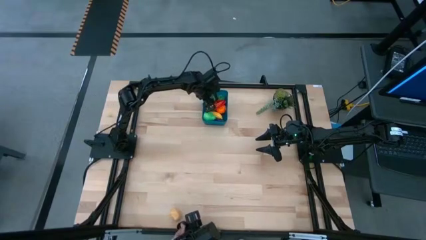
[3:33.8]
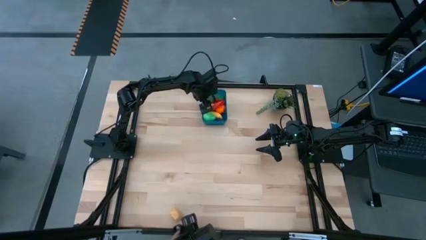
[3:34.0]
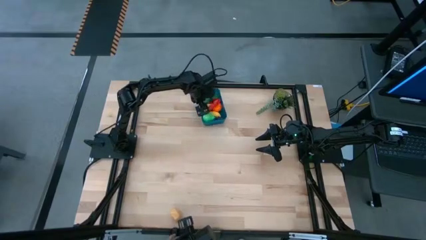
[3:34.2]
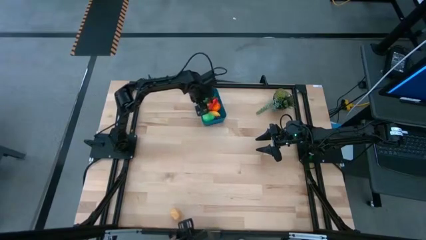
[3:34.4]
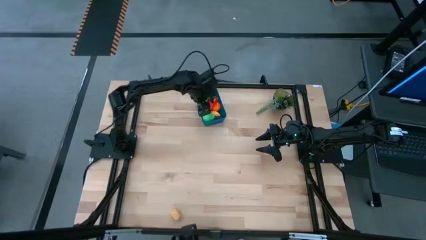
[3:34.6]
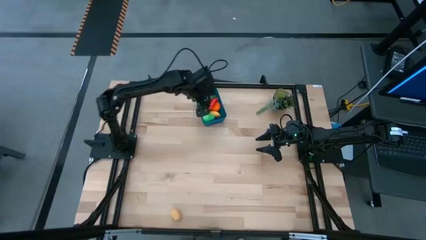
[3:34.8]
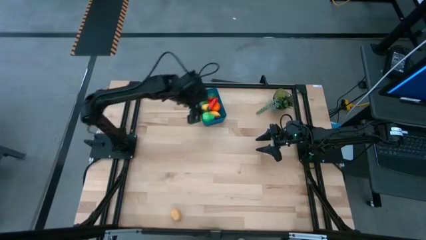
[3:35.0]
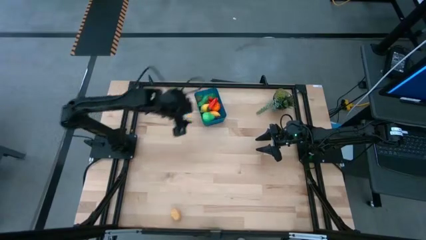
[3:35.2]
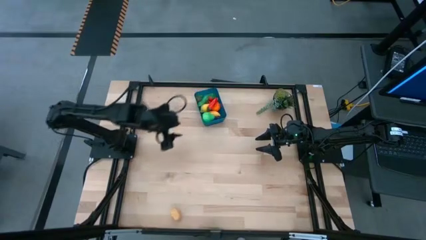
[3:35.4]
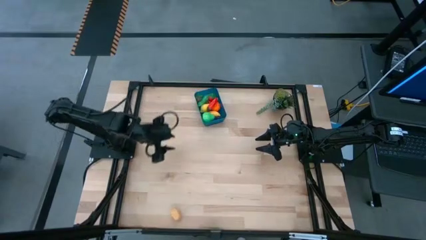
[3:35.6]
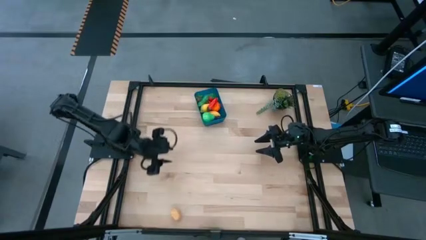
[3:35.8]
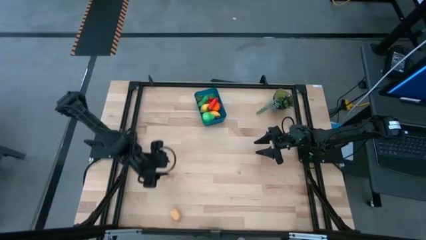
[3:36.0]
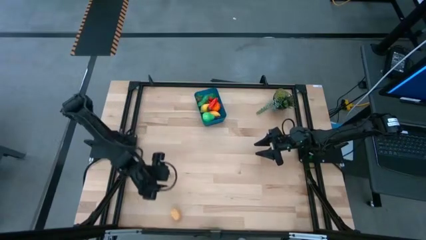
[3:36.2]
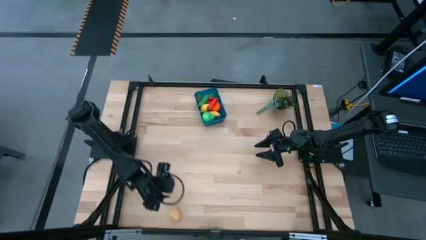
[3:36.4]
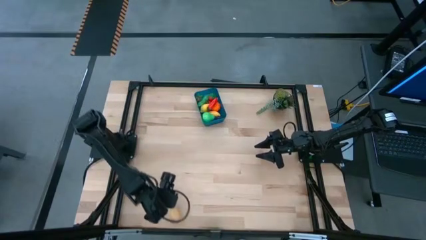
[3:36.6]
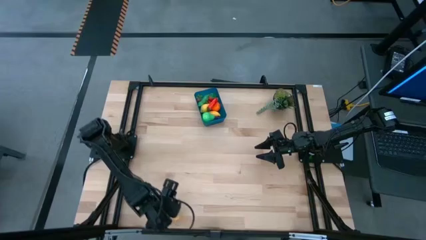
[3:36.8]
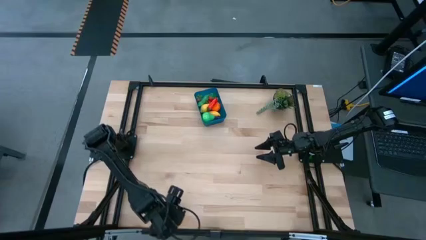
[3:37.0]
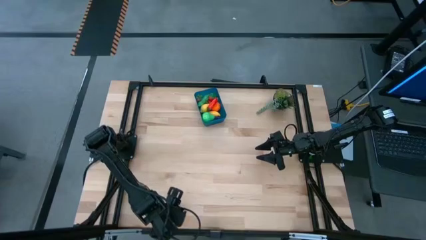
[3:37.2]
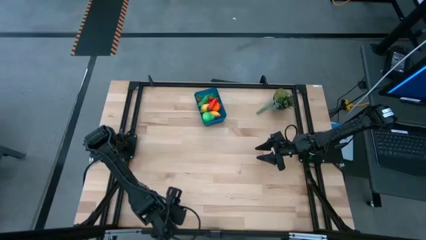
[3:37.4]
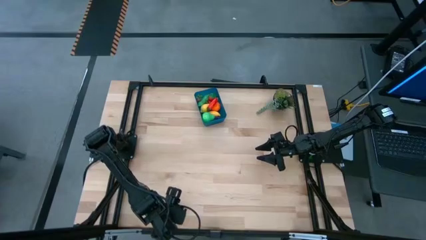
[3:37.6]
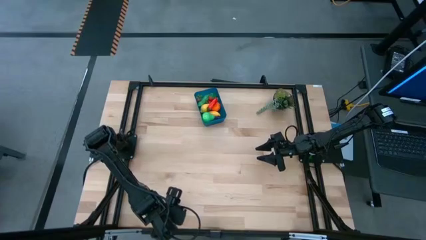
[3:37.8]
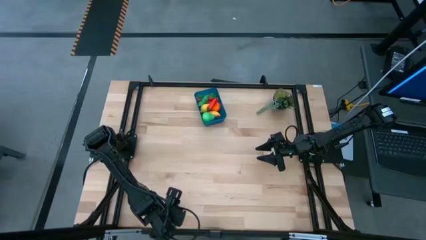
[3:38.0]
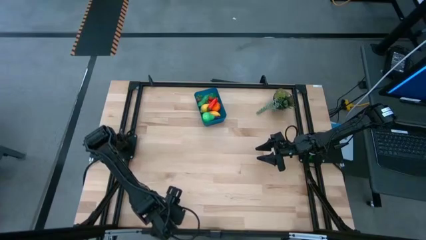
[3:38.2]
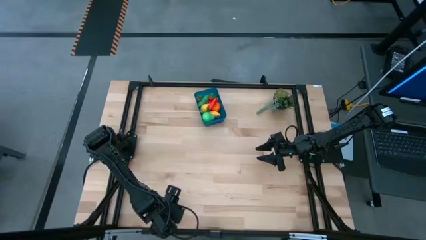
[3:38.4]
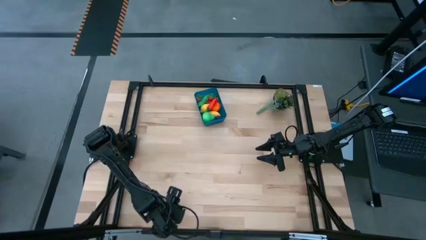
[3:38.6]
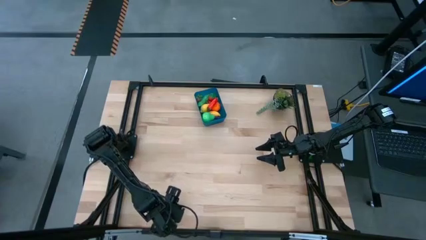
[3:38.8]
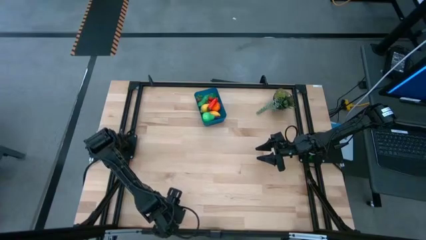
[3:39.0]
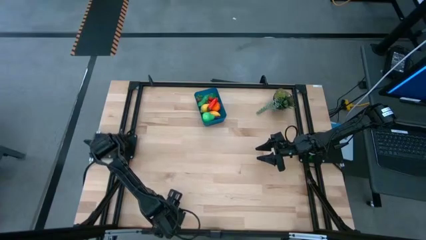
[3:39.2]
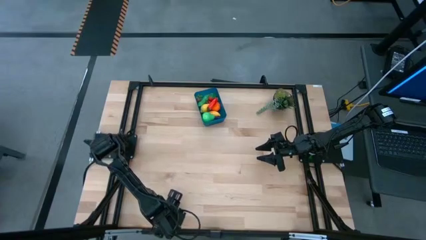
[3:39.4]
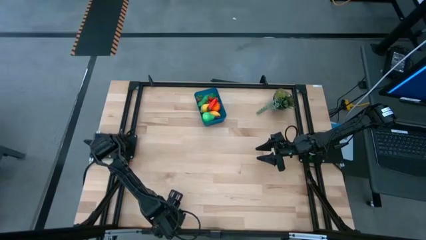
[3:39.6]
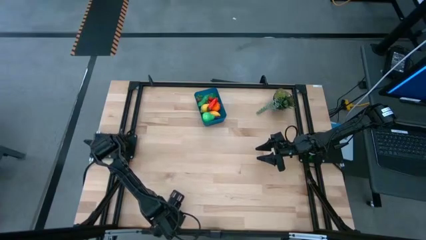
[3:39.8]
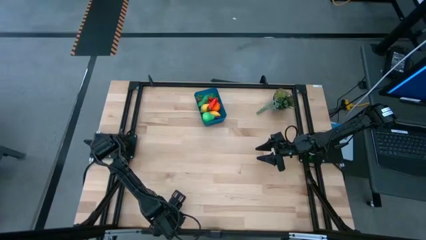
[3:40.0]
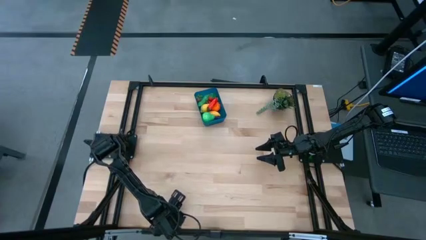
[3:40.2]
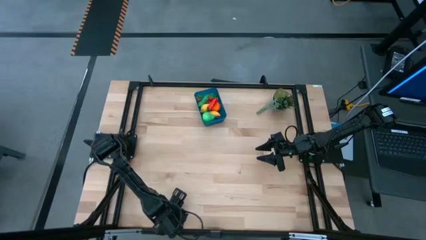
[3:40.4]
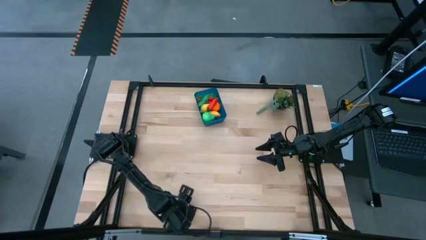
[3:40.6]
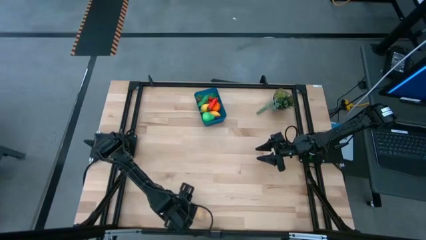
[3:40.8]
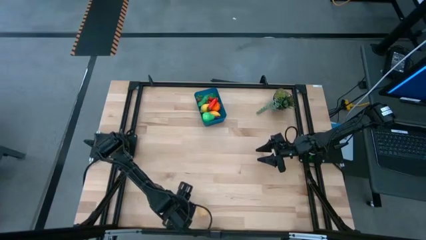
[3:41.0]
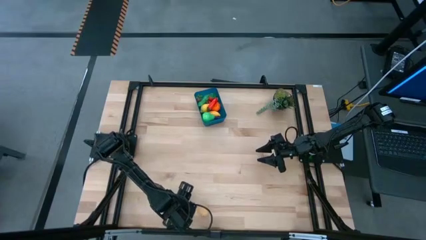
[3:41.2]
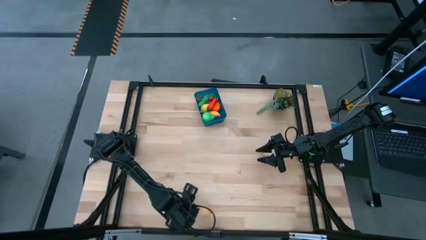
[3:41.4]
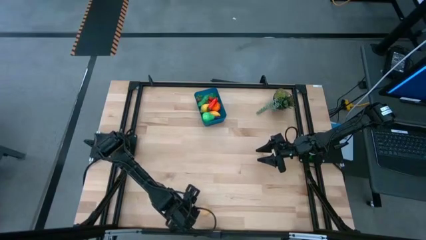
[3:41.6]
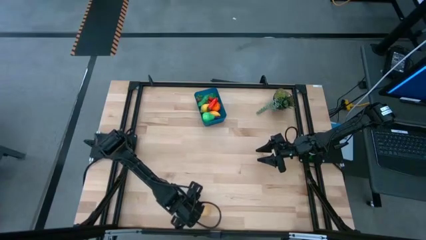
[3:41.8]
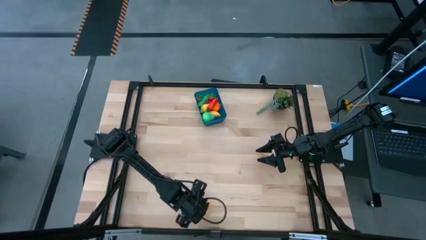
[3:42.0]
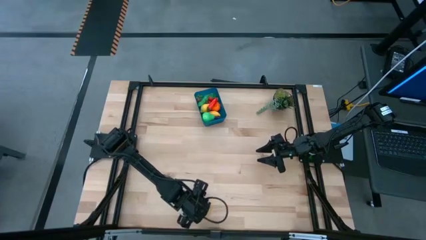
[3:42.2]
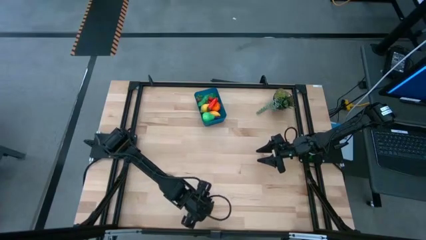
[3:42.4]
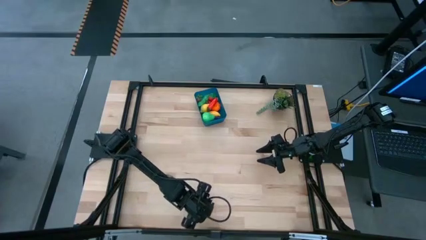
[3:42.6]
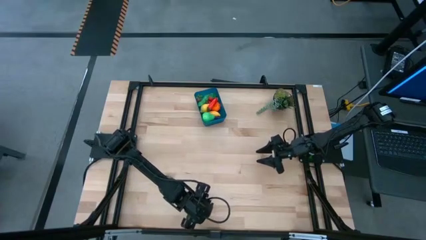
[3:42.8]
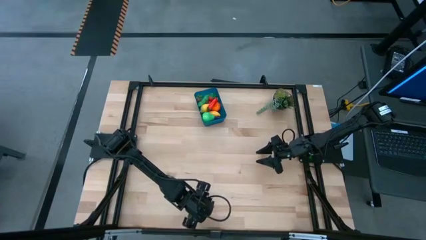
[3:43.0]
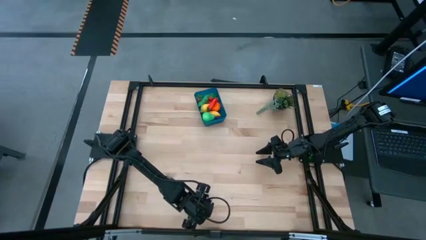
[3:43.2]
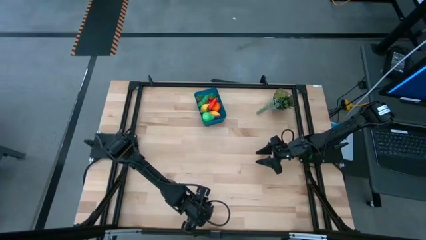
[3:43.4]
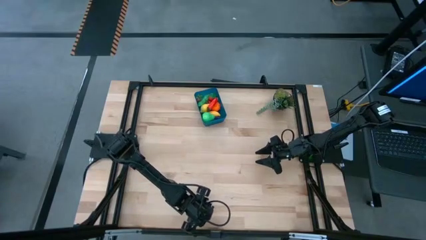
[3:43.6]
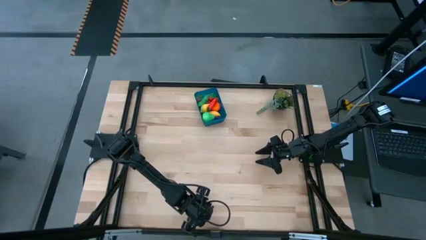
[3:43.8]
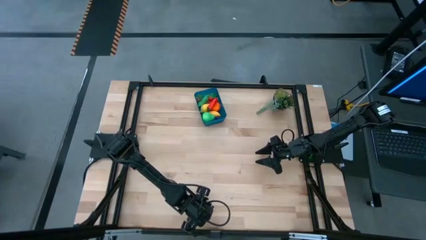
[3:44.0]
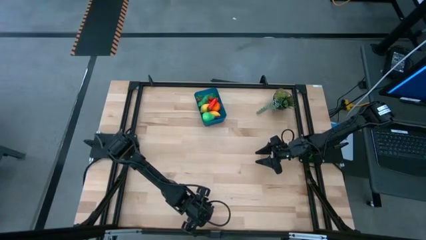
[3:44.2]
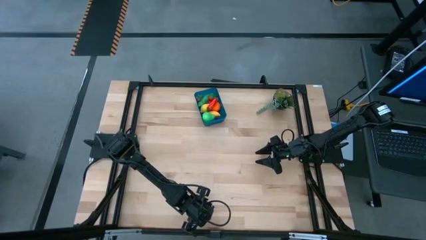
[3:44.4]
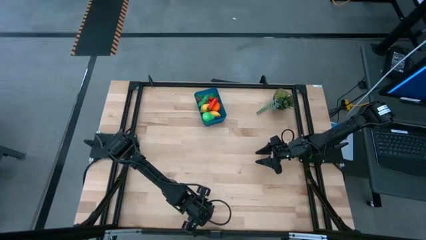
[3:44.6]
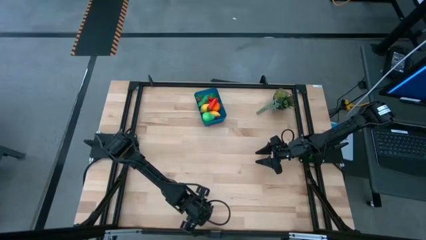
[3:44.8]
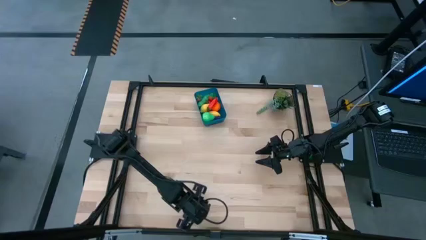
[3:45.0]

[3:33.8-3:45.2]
Task: Pick and placing Produce into tupperware
Put the potato into the blue bin

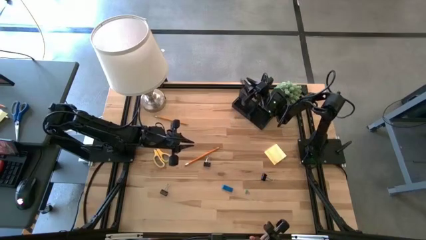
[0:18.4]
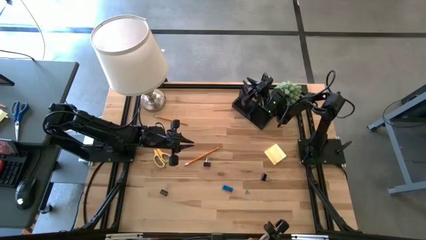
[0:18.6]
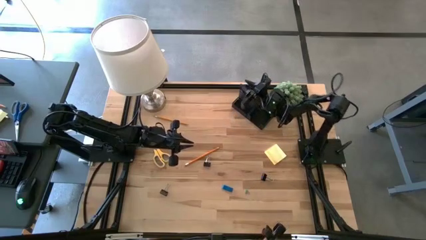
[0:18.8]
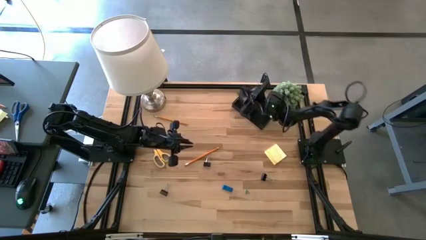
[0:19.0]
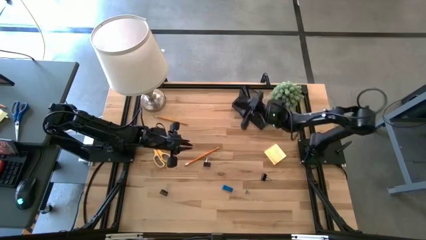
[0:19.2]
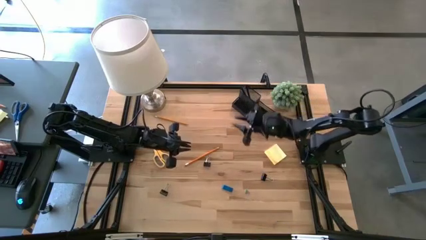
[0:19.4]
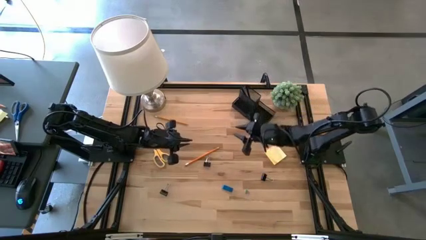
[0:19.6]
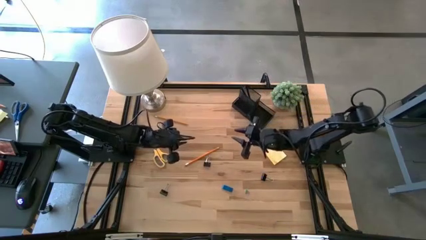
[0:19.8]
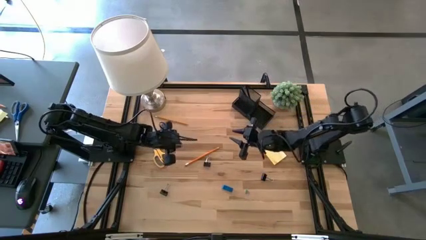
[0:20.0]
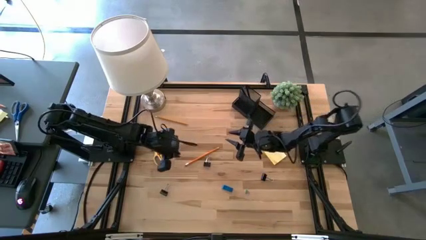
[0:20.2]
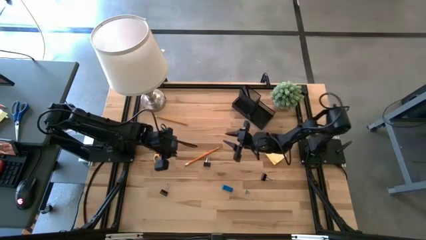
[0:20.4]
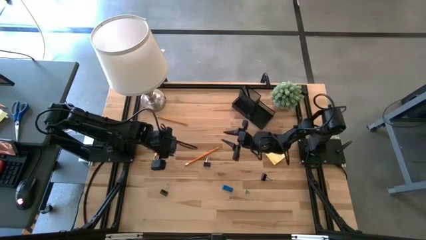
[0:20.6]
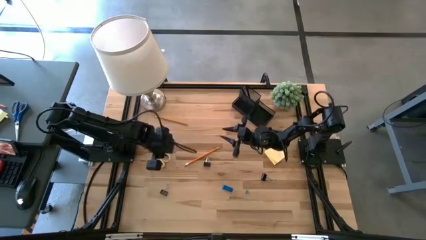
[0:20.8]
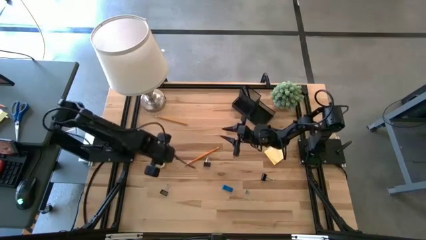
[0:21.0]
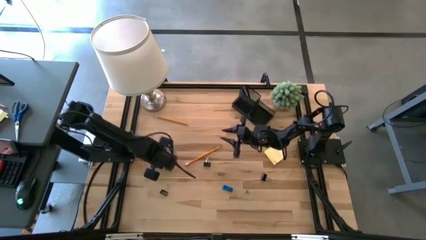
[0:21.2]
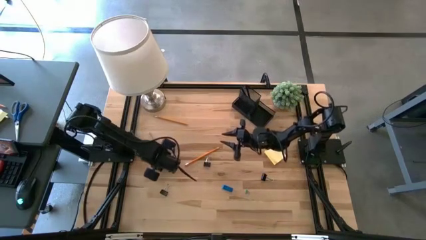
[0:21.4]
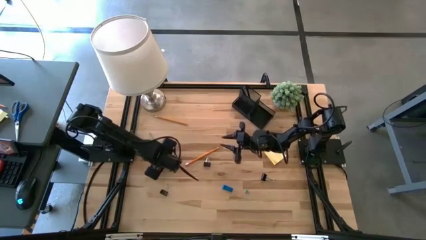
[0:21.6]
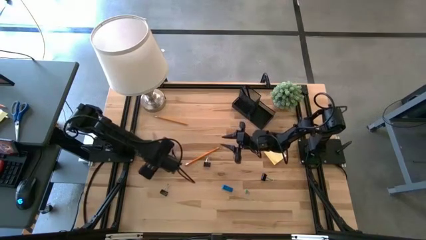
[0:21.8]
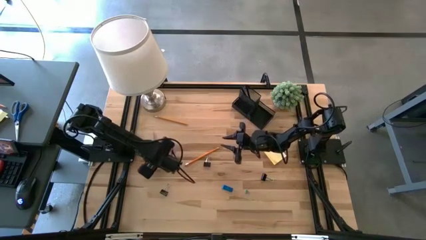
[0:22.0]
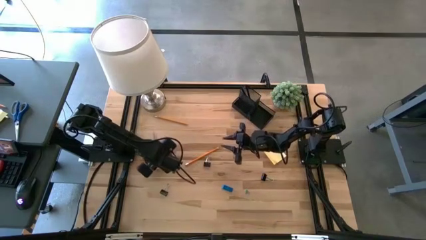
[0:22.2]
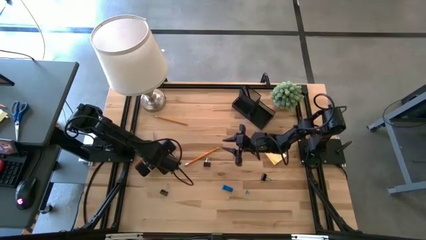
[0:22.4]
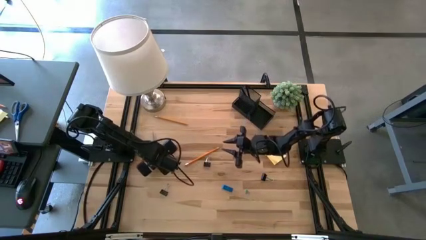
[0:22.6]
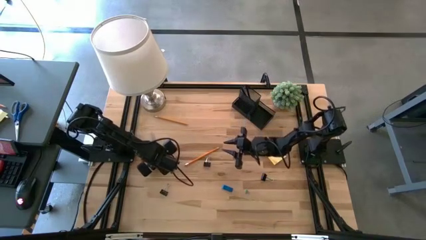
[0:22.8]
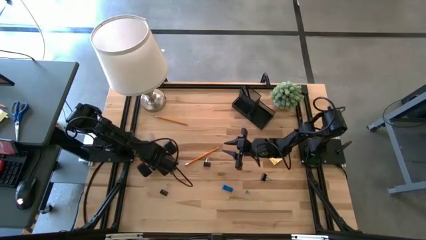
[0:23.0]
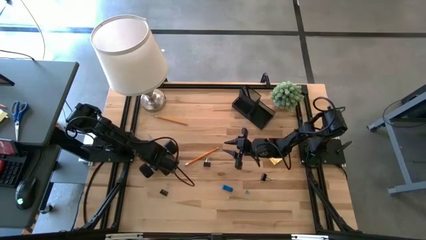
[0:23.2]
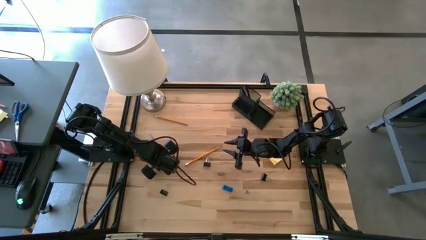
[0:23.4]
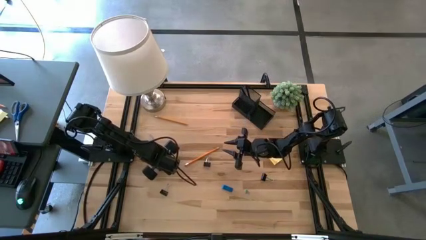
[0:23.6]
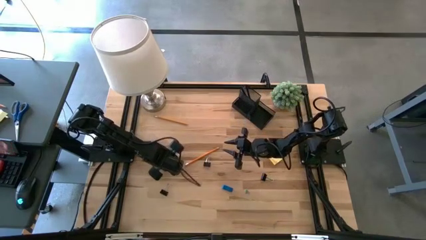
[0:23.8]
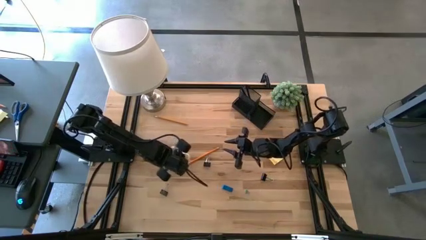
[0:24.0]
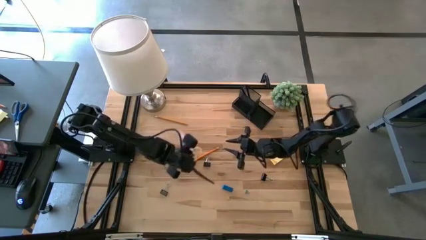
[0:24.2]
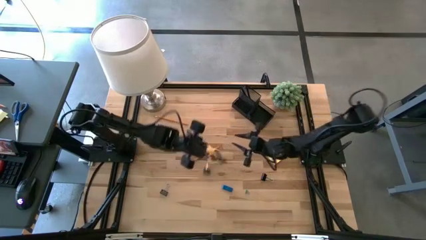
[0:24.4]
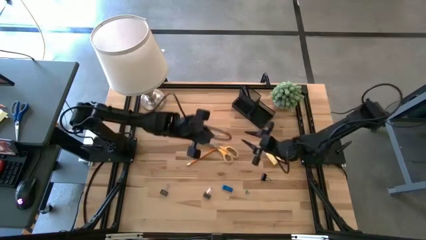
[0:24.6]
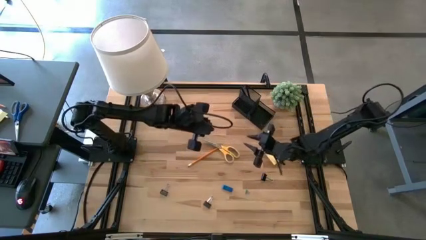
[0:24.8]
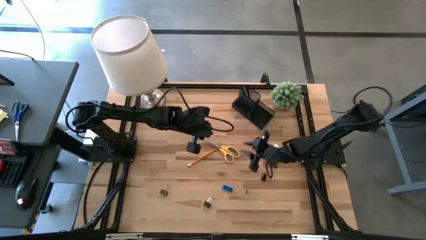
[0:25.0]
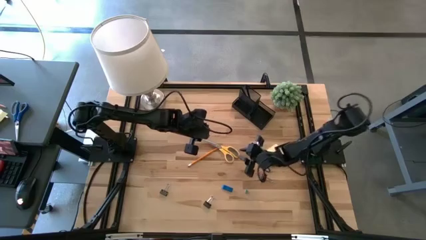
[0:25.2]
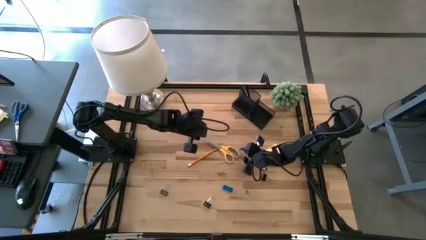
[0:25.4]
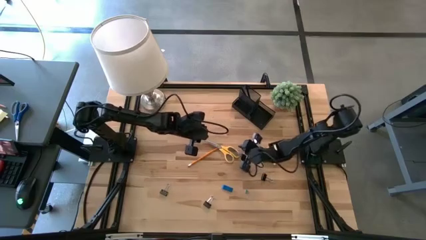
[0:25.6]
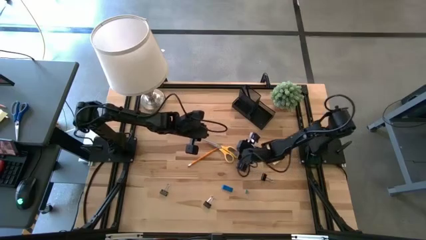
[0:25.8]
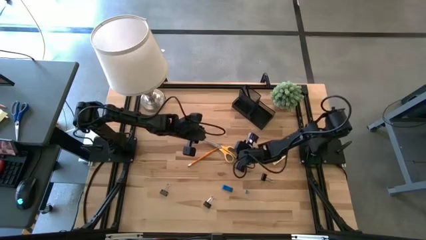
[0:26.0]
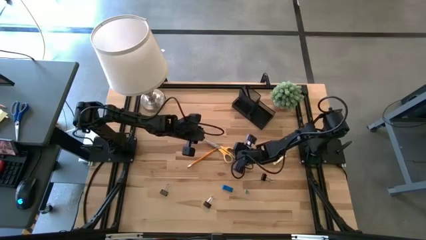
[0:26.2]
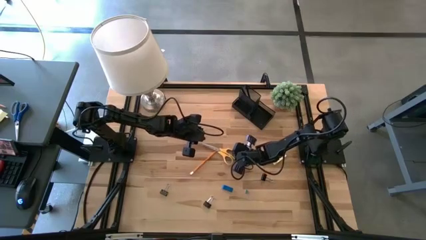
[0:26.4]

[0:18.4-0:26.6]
Task: Pick and place office supplies into organizer
Put the yellow scissors into the desk organizer
